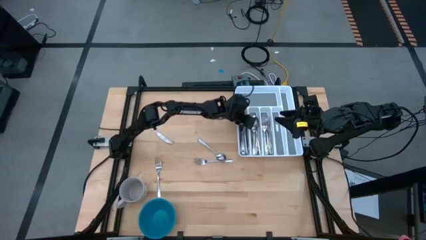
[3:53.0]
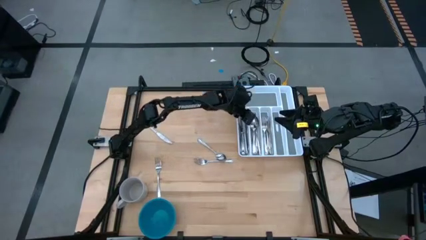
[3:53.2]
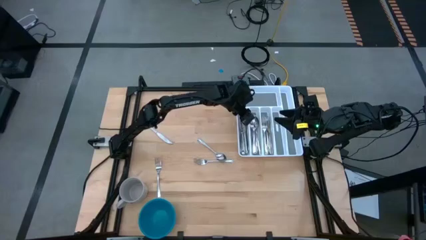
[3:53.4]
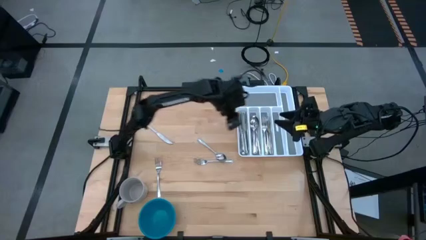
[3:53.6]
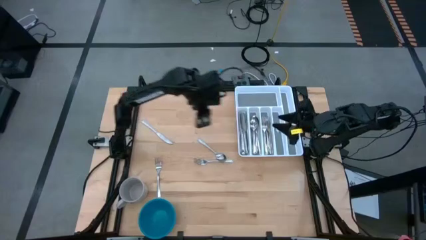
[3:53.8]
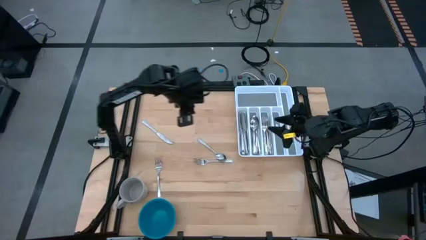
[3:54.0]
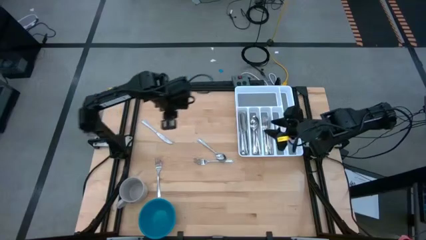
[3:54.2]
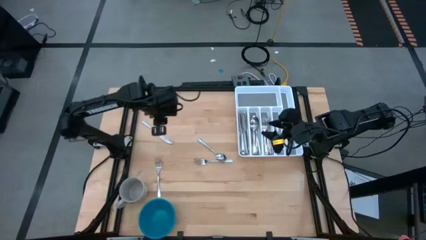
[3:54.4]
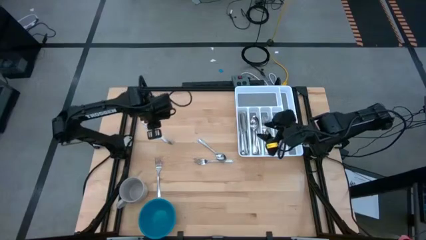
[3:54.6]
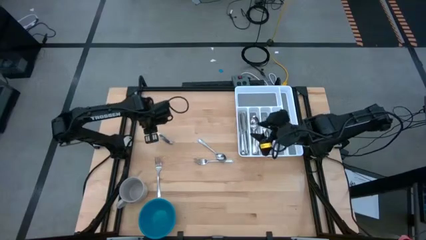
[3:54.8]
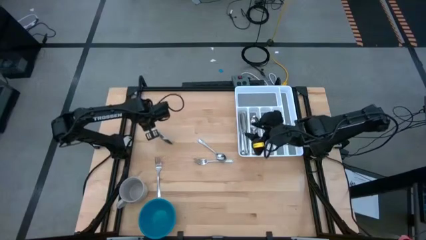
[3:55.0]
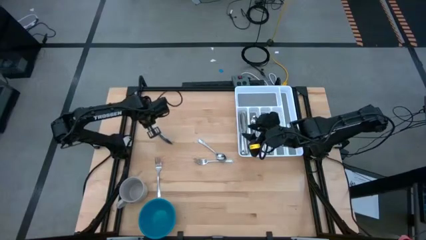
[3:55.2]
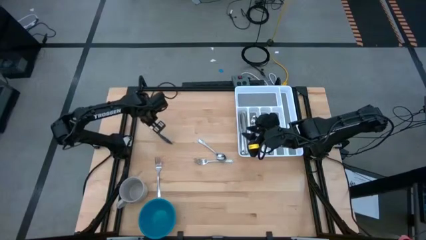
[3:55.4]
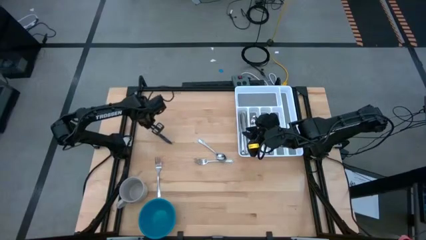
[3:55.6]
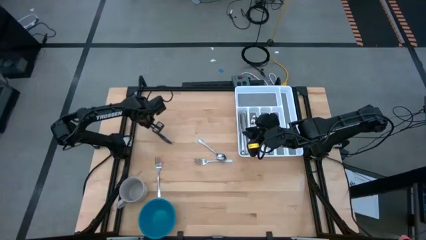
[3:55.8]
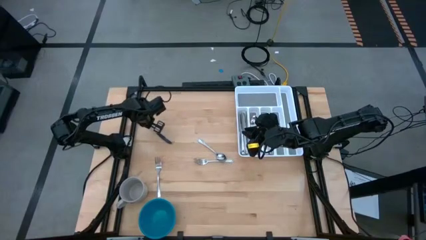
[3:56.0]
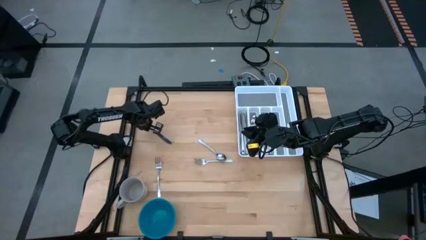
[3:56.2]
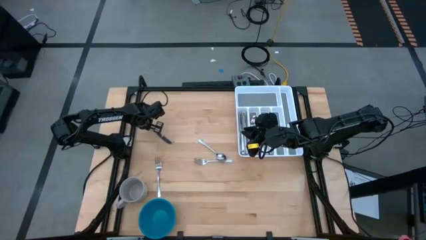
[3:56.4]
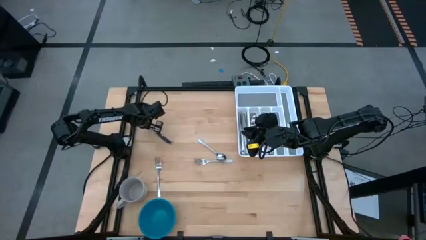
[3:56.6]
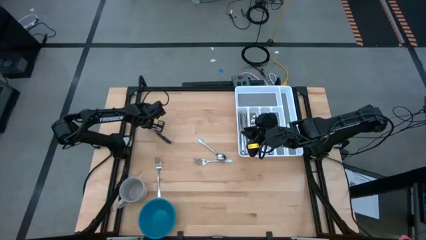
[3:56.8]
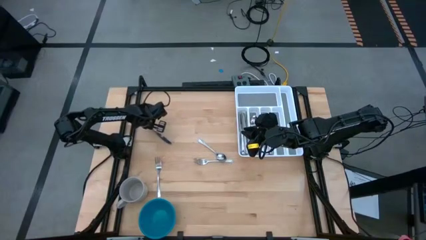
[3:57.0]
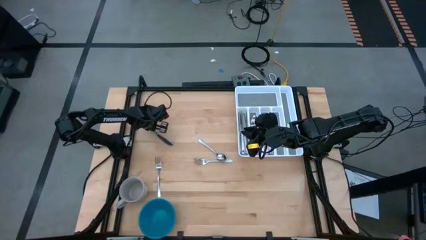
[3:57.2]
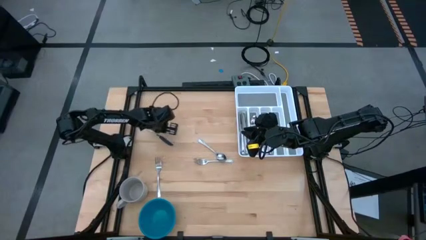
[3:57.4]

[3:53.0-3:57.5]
Task: Sort silverware
Put the table knife into the silverware tray

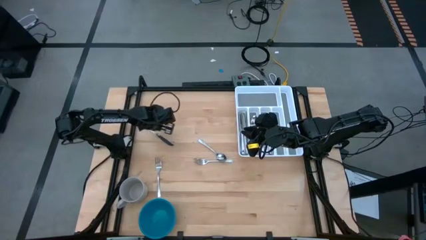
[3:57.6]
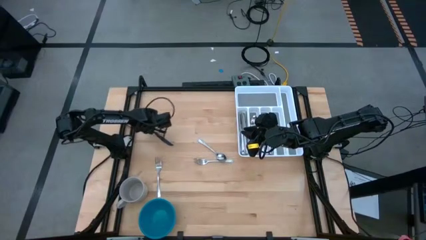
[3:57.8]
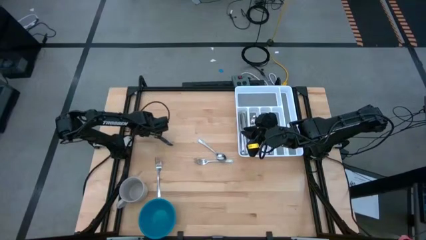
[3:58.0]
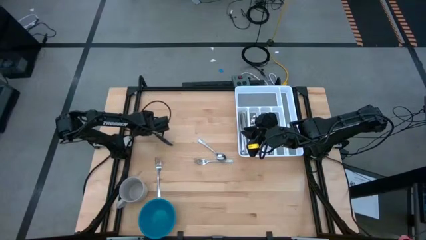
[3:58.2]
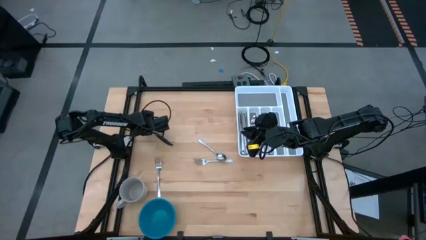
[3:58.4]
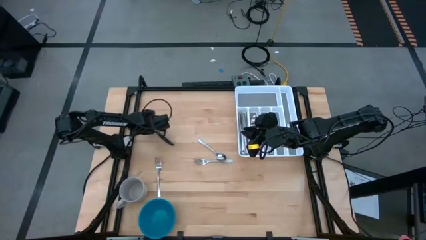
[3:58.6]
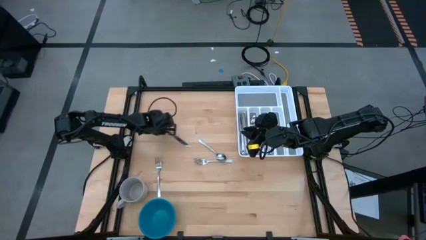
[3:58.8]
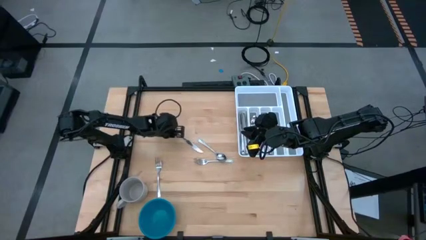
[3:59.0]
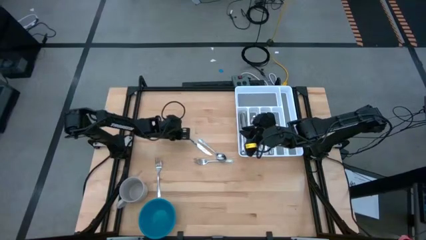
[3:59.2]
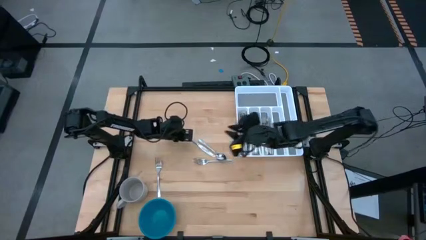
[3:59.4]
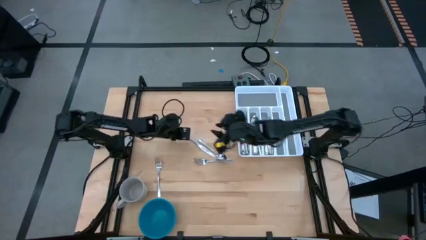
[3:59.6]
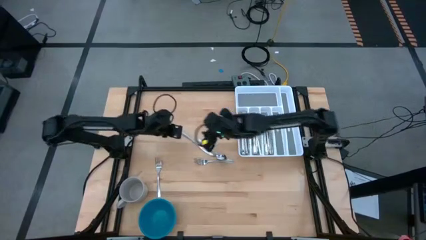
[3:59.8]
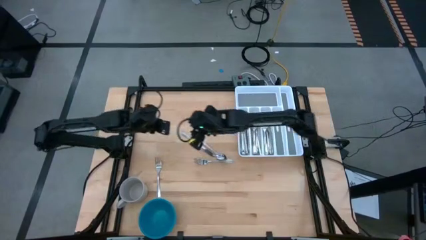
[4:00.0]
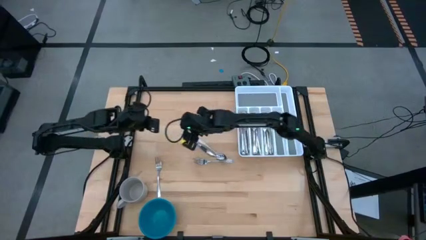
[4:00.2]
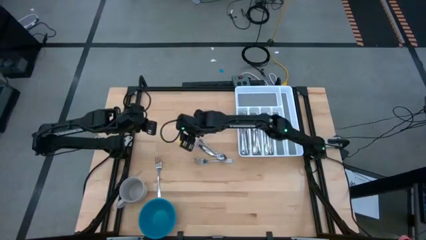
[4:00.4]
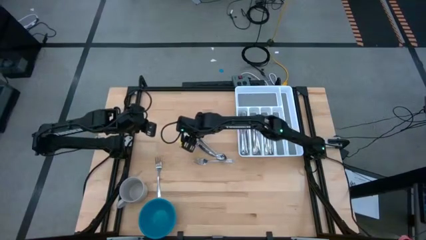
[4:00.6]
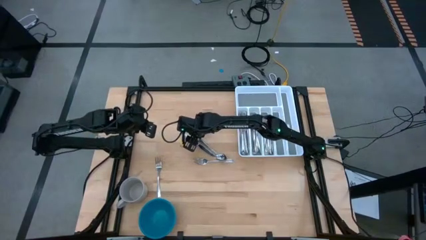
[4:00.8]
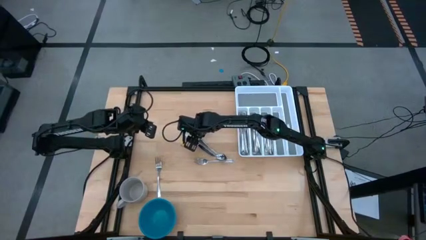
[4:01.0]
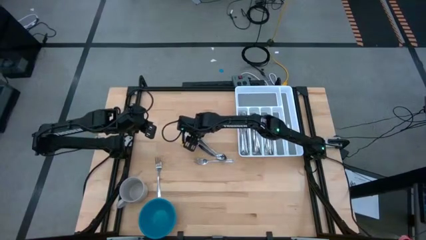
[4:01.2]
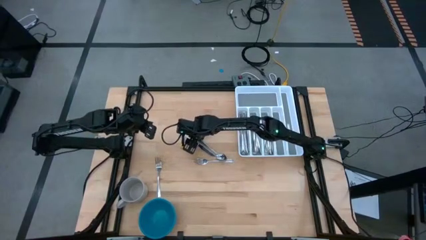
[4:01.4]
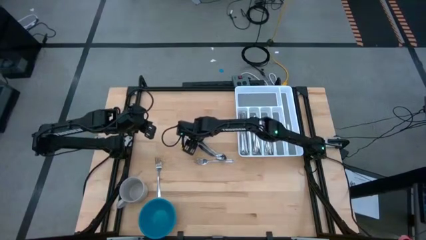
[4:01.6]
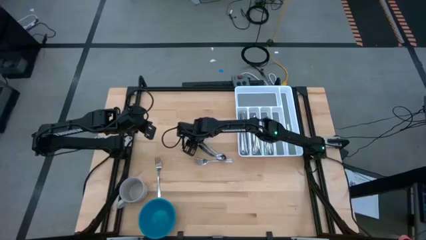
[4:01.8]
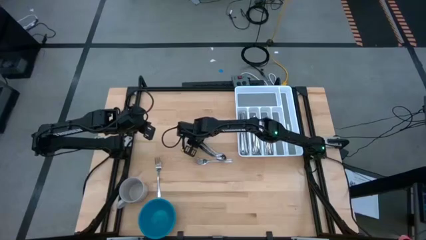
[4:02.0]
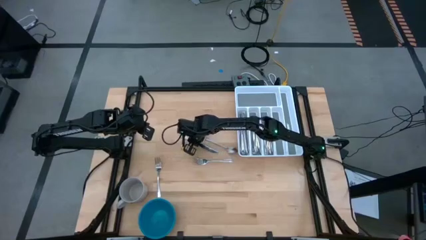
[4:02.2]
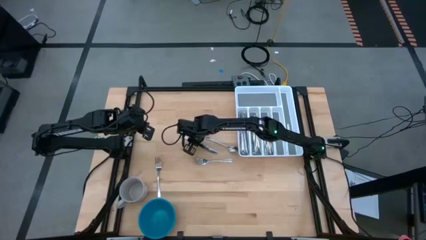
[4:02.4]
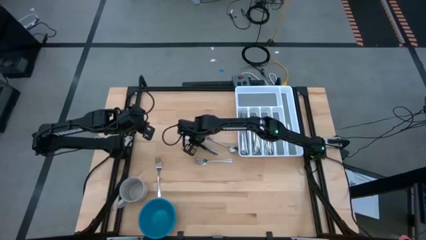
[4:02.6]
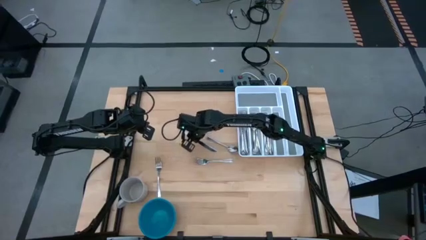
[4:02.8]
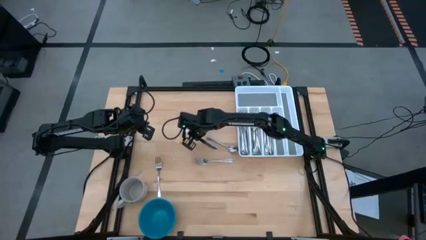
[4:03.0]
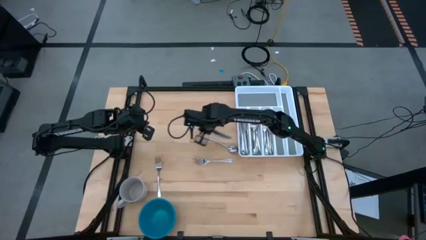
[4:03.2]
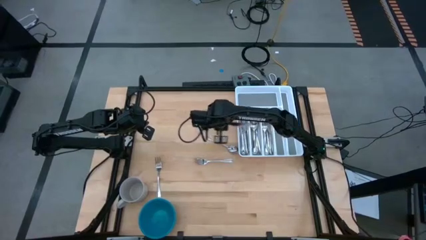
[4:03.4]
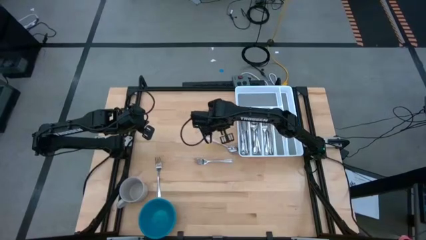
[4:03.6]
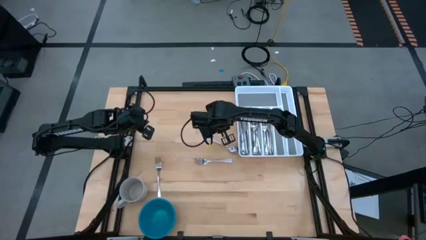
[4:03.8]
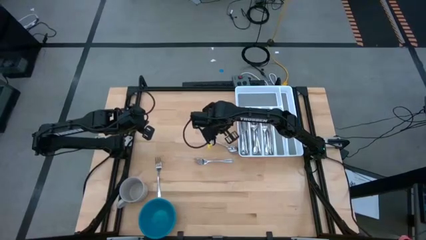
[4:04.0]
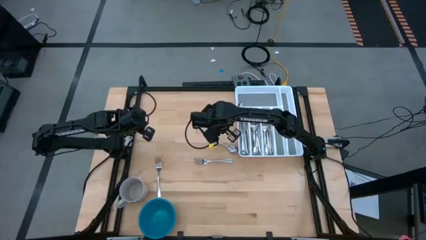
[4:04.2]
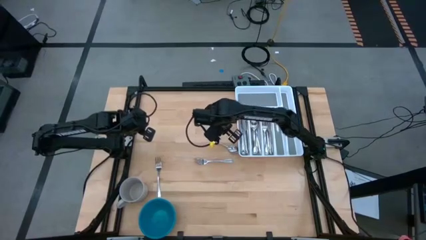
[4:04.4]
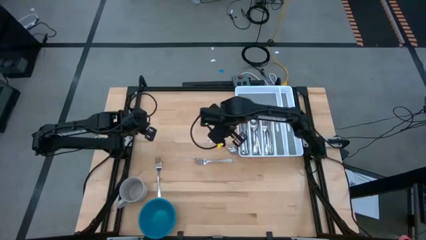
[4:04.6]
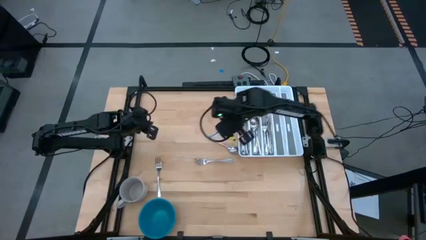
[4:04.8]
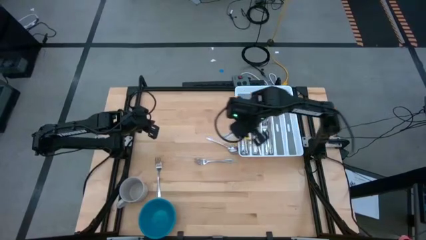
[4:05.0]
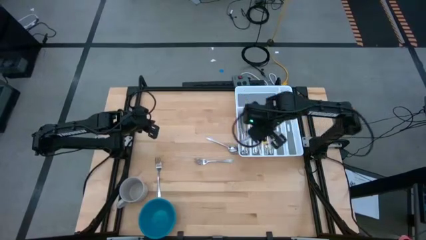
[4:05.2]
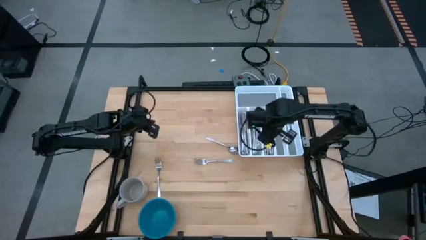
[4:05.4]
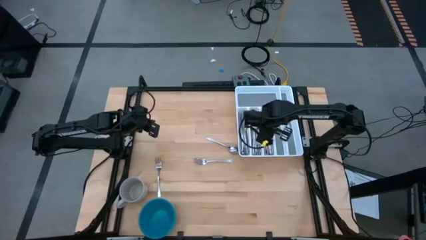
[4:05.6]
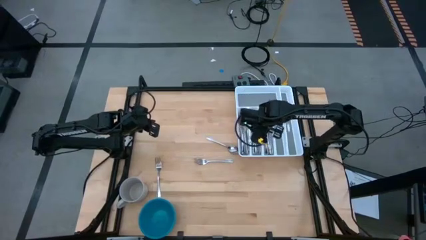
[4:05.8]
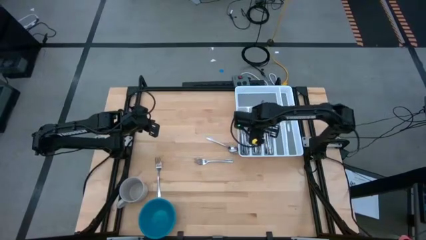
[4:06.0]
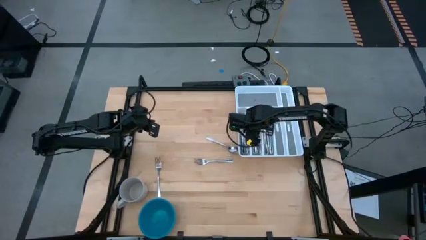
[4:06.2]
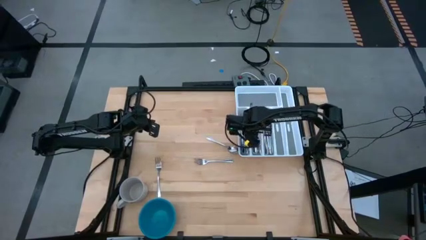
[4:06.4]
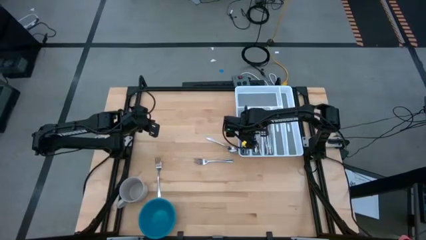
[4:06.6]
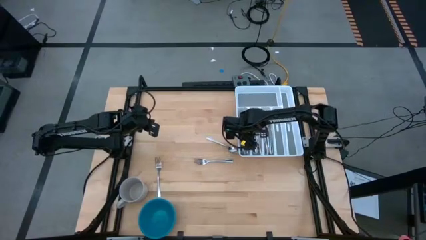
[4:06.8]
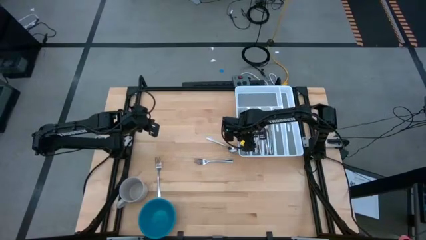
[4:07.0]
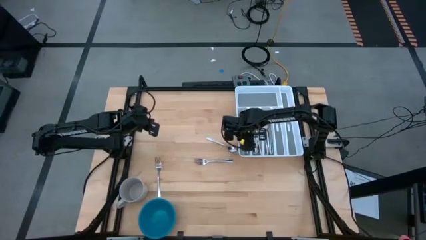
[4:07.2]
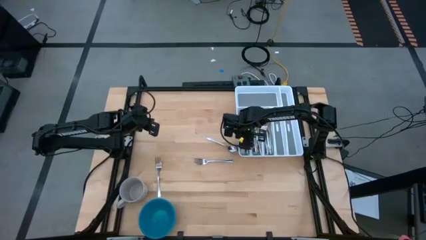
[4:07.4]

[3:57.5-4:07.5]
Put the table knife into the silverware tray
